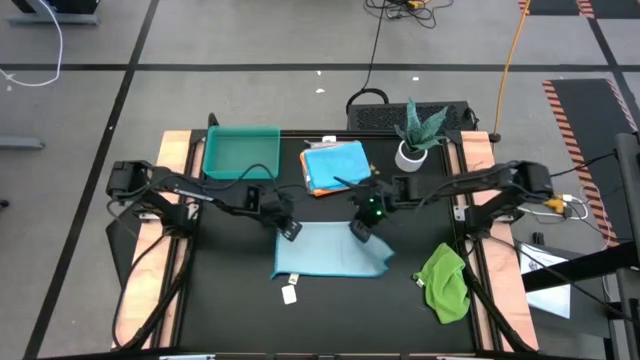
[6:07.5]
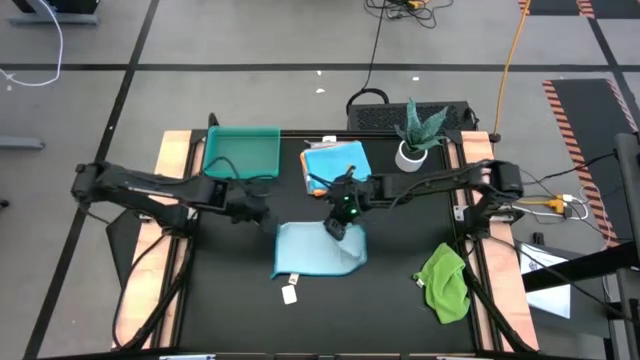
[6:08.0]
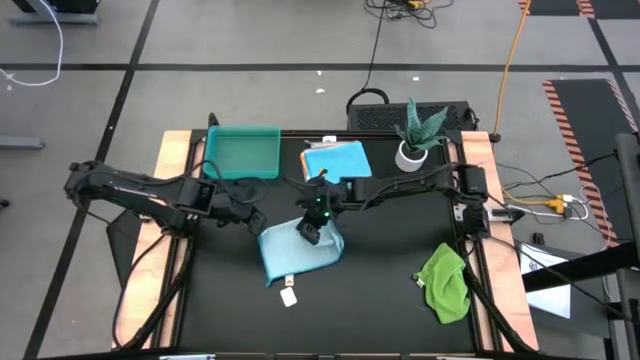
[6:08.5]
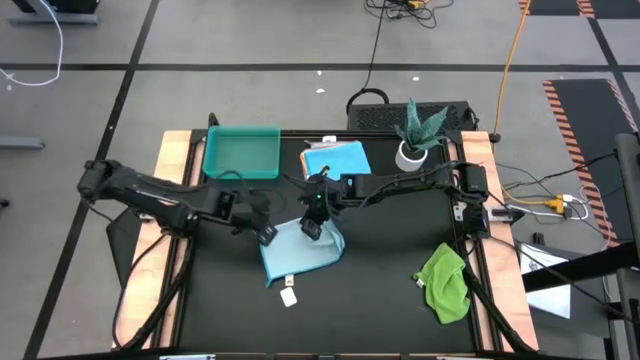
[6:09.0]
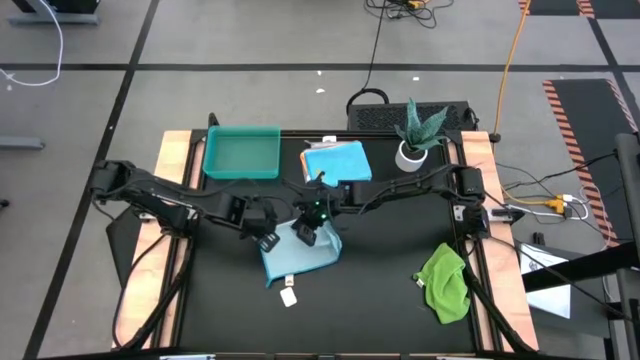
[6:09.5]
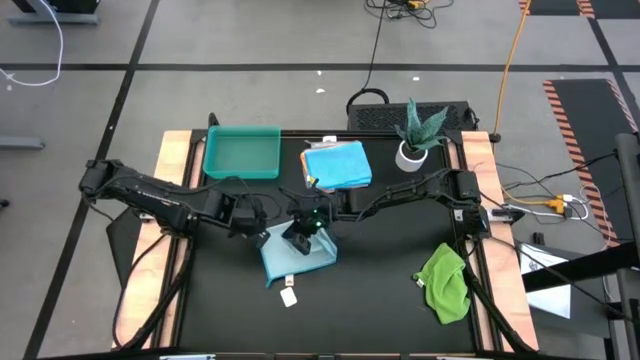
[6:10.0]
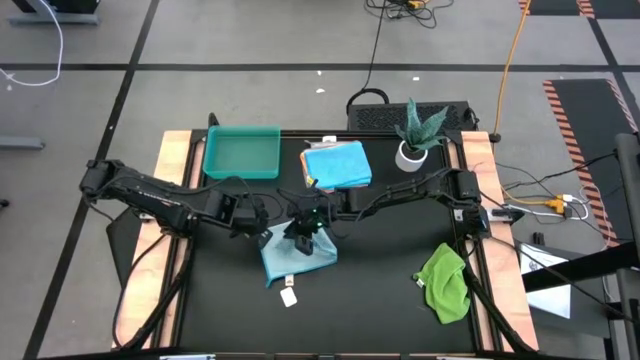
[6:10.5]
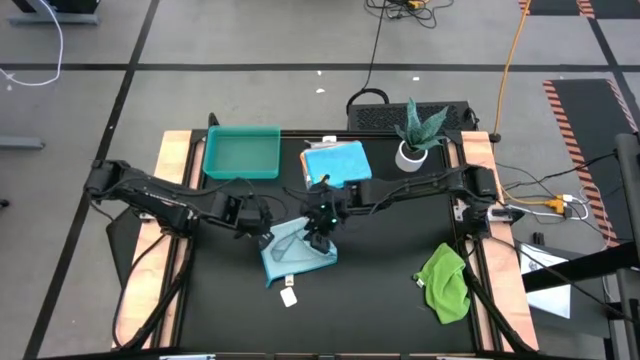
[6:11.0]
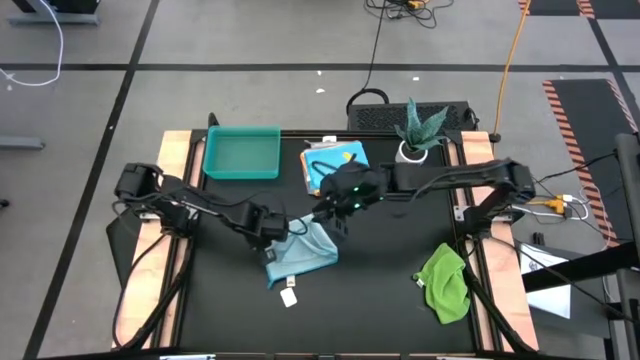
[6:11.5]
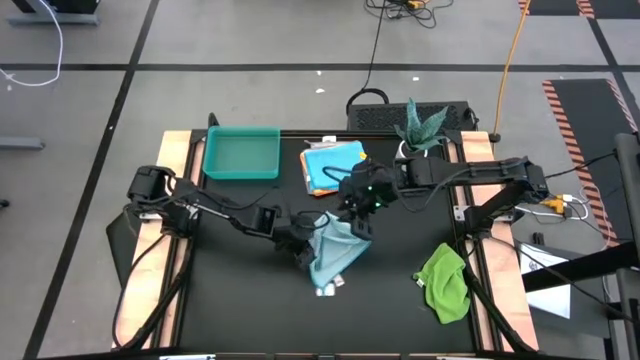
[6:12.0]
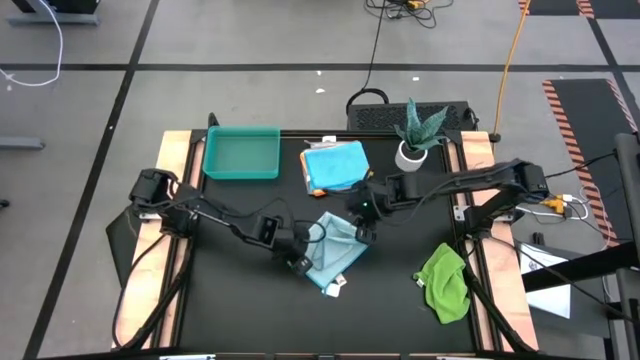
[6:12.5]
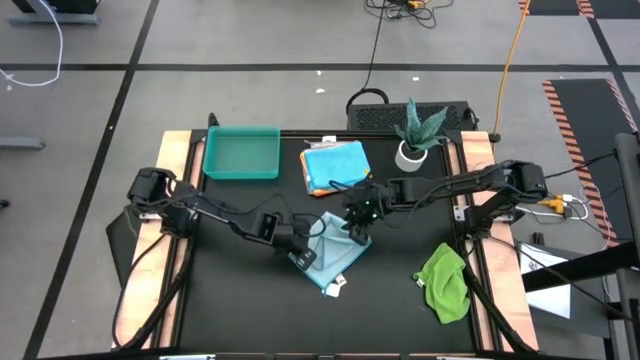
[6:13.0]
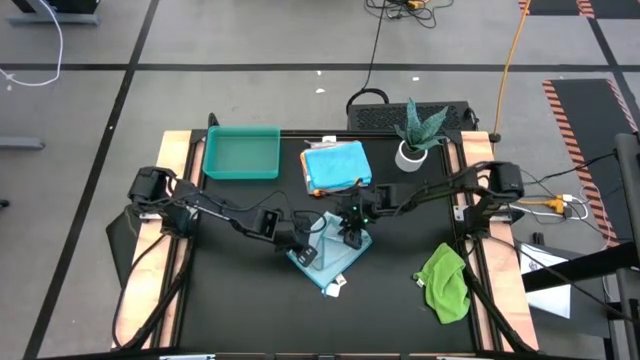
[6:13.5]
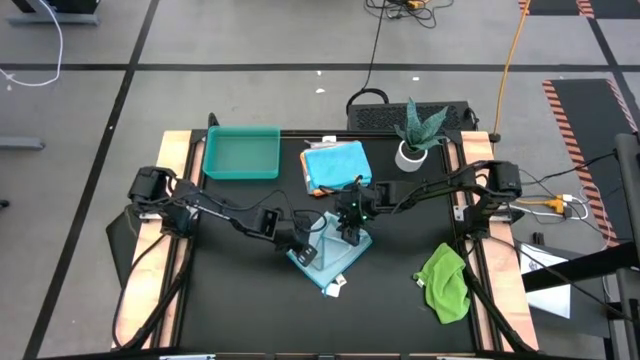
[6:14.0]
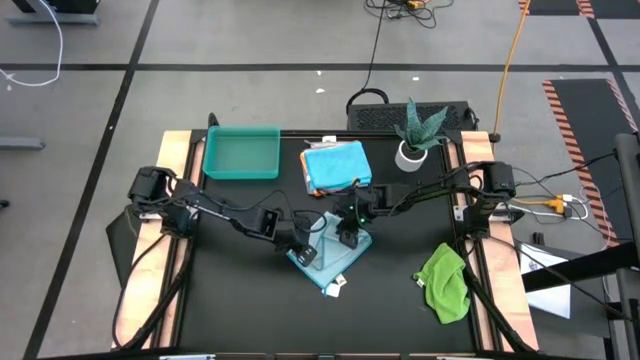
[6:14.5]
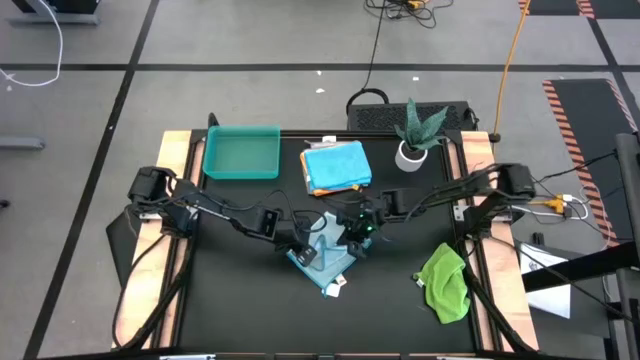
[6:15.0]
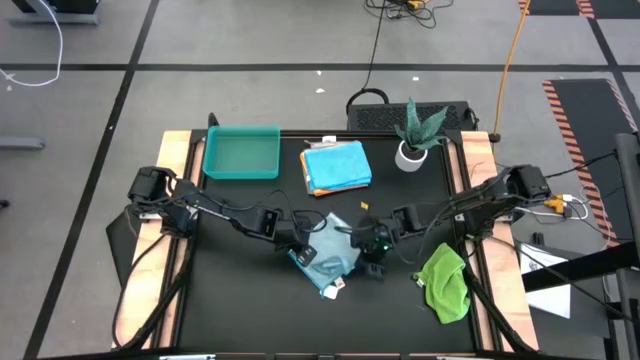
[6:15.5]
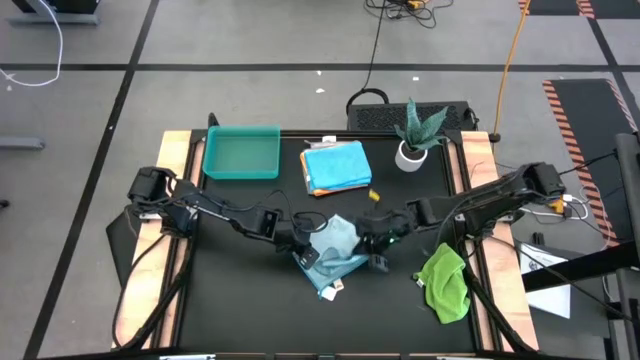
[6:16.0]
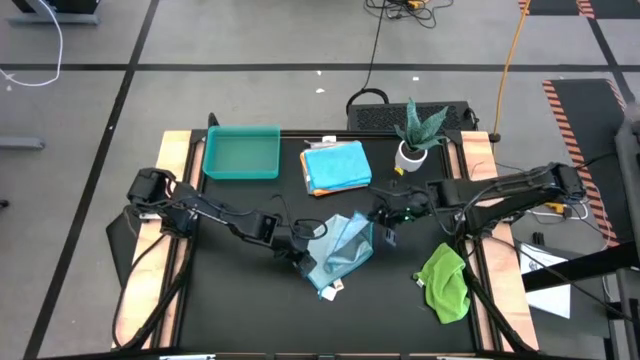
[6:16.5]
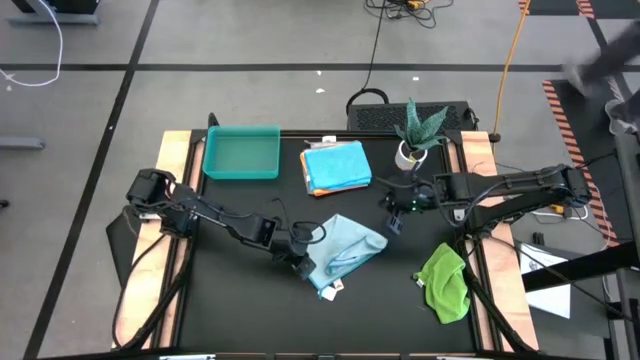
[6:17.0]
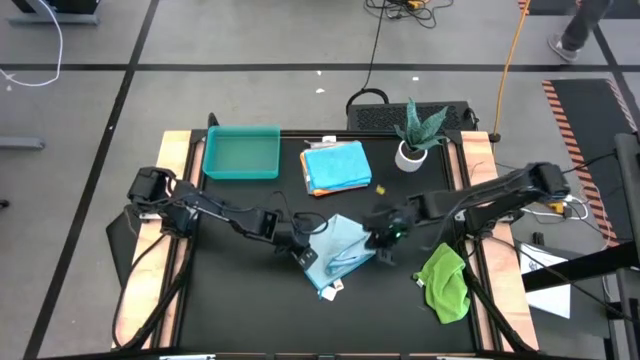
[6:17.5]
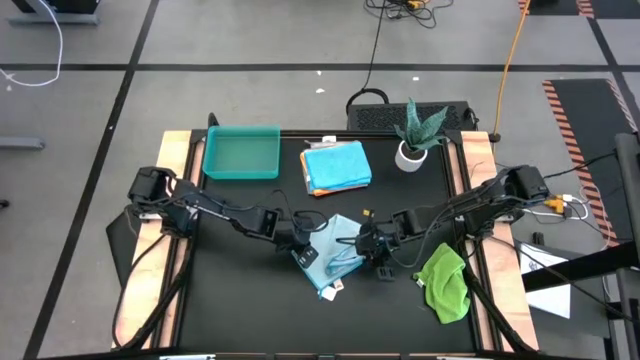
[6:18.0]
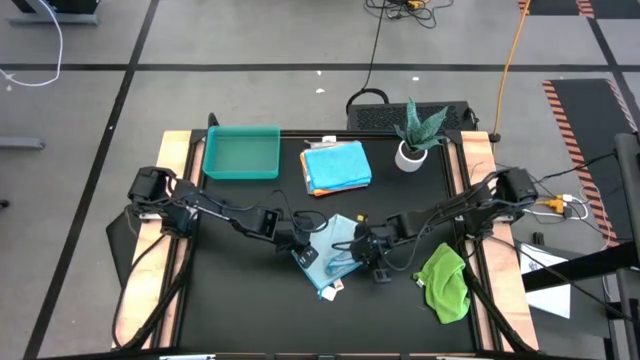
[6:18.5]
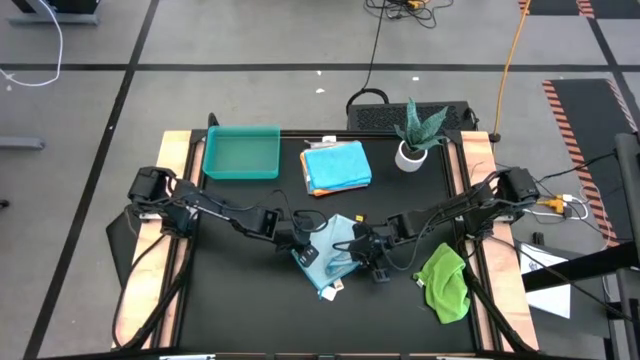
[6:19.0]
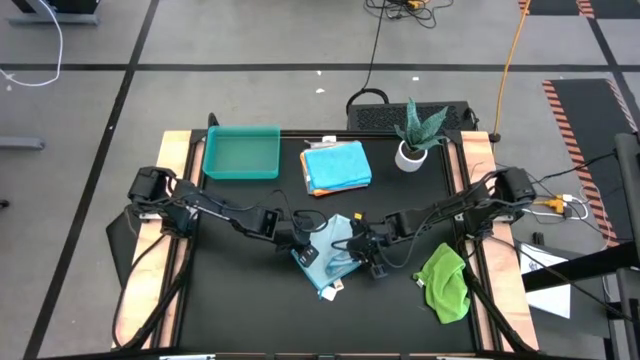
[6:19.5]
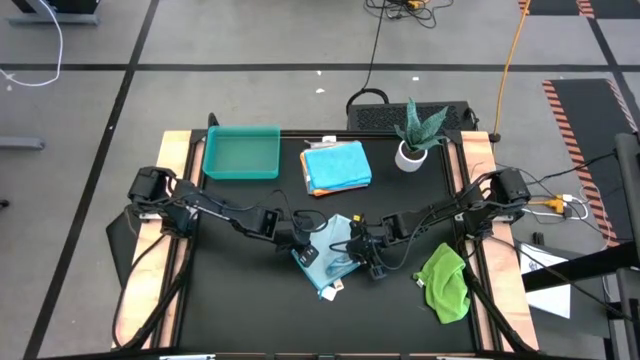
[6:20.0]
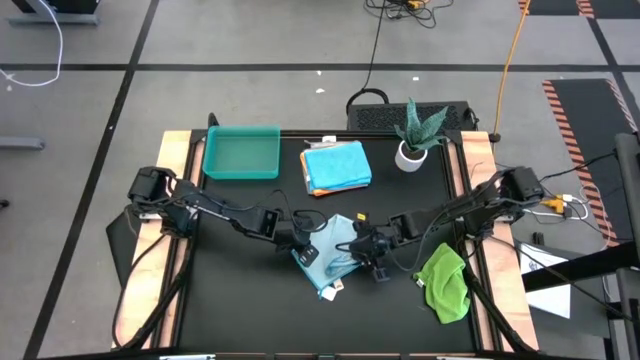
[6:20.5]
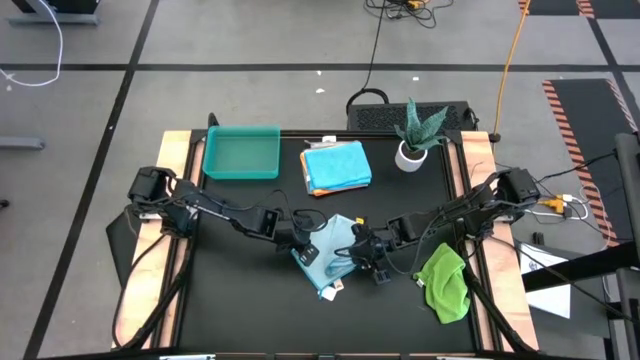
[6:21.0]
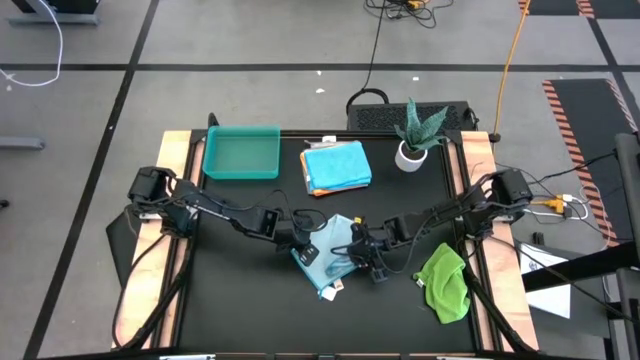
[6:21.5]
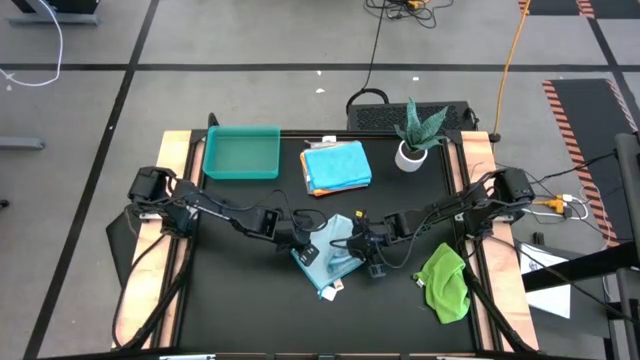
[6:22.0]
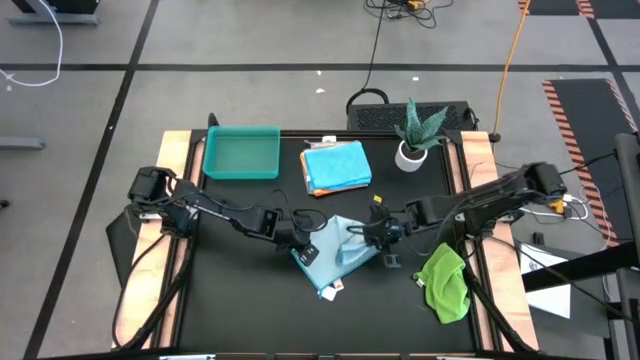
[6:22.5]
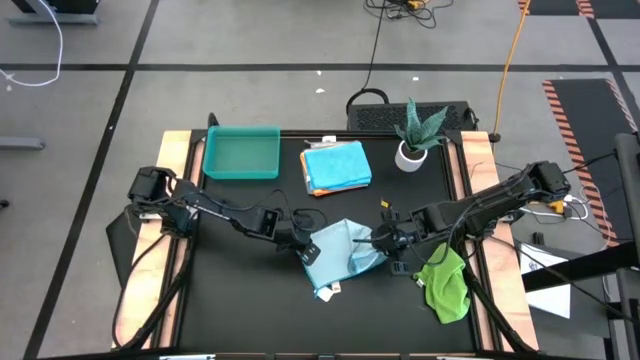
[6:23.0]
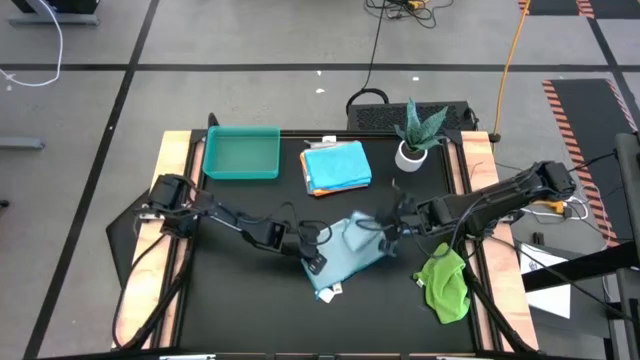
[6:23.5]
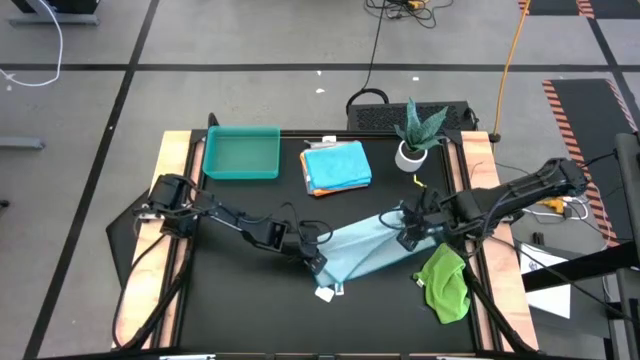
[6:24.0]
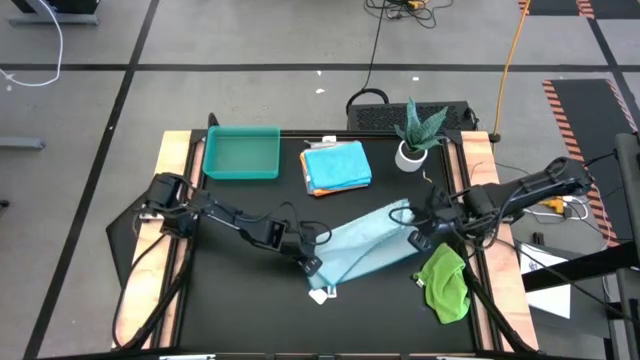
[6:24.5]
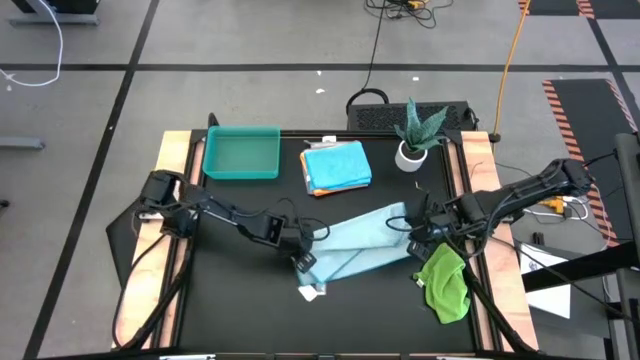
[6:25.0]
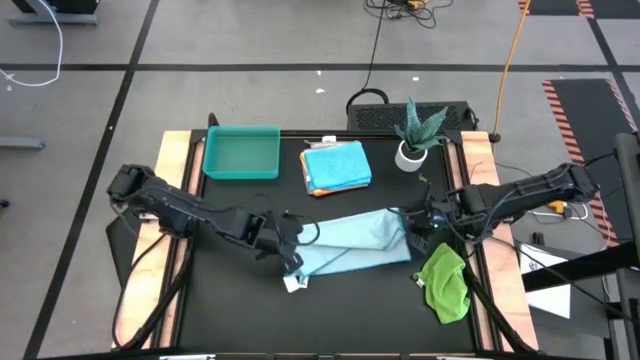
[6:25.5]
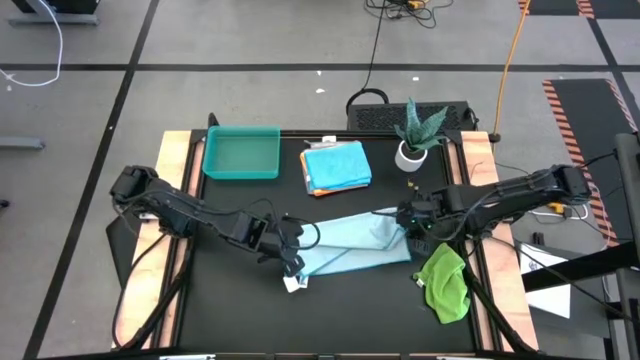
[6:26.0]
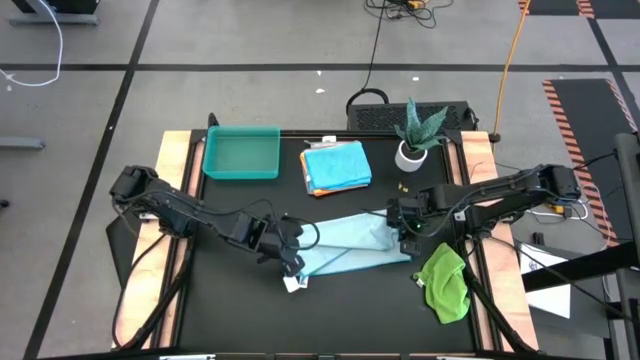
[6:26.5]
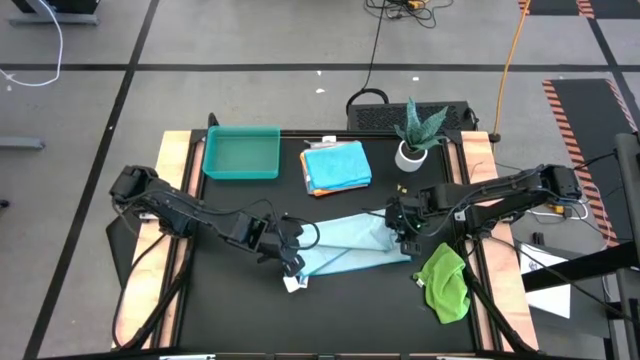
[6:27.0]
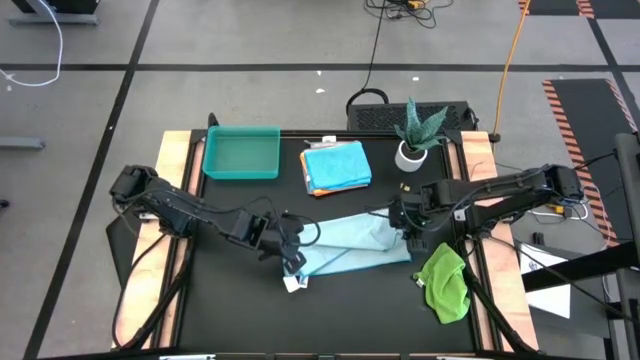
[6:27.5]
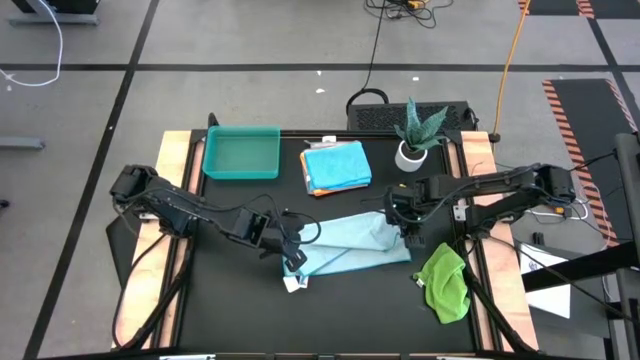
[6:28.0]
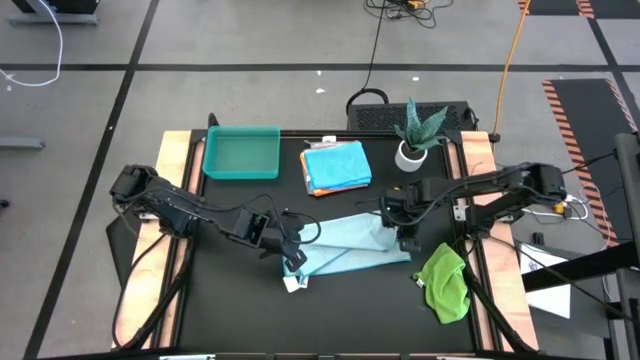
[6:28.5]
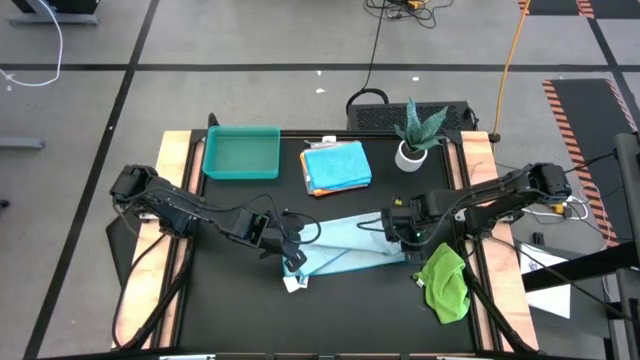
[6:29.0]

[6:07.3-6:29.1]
Task: Fold microfiber towels
Fold the light blue microfiber towel
